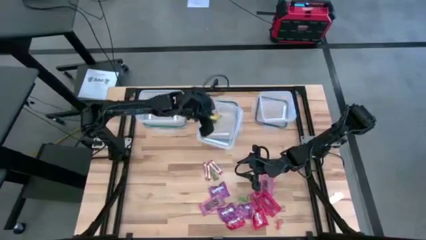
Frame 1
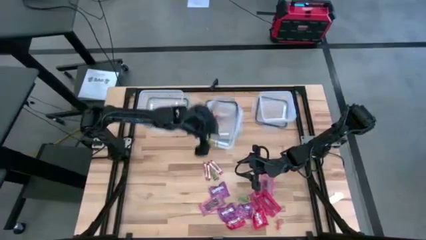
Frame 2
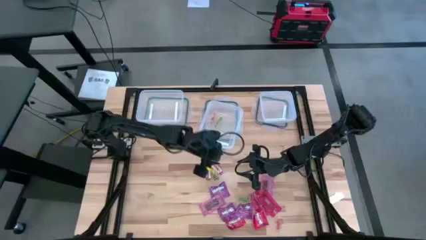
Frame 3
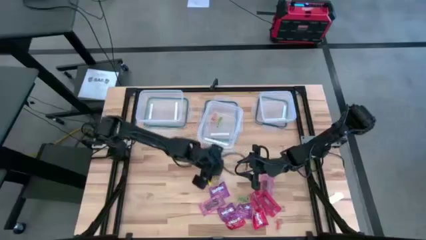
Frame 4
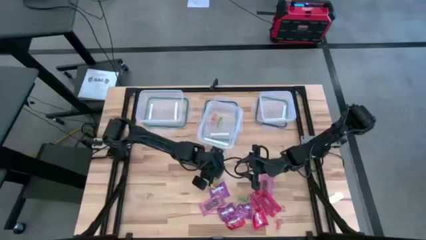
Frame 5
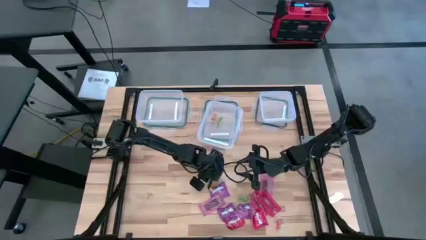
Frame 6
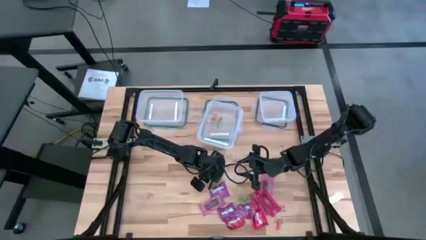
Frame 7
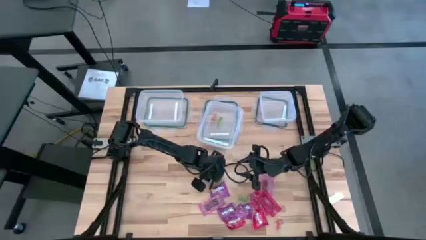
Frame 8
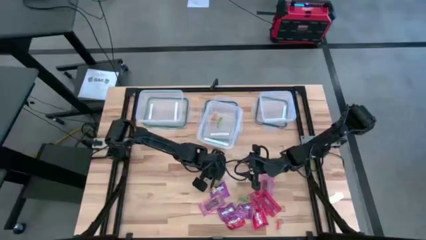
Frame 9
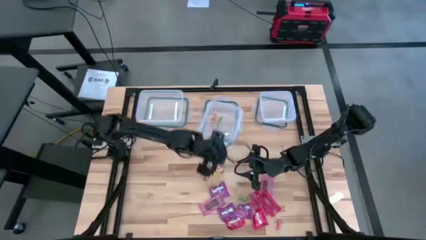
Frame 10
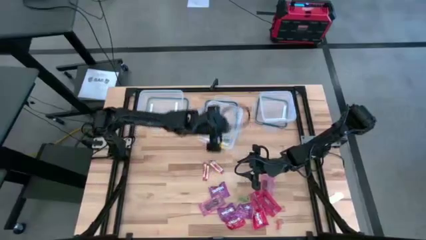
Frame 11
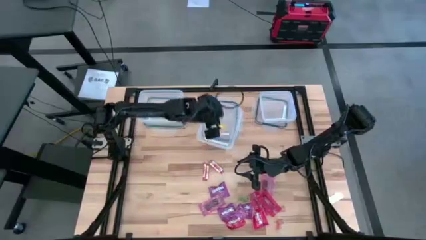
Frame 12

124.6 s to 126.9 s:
Task: Sort candy
Put the top green candy into the center transparent bin

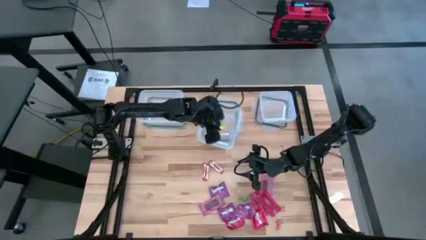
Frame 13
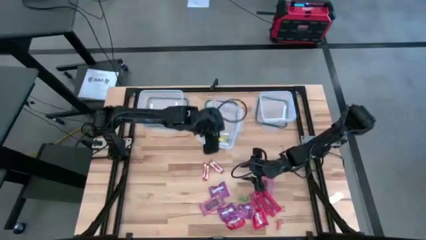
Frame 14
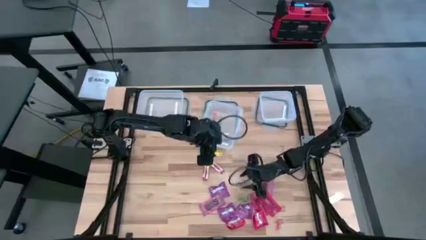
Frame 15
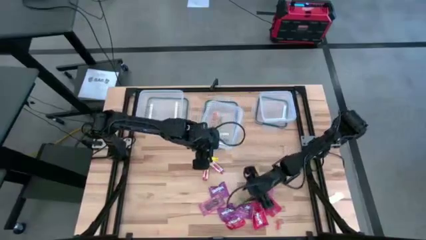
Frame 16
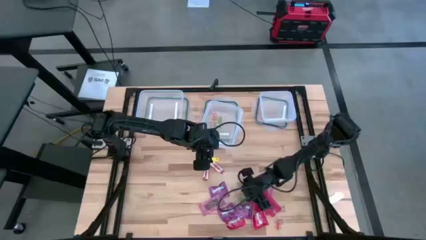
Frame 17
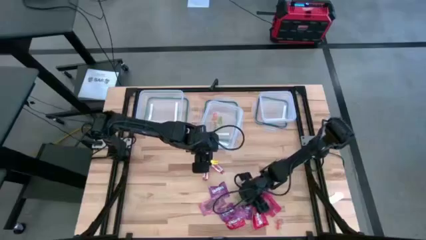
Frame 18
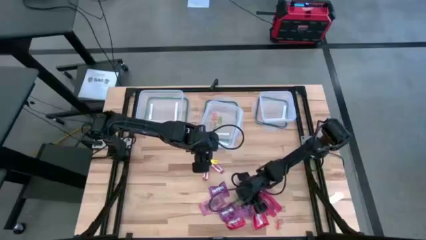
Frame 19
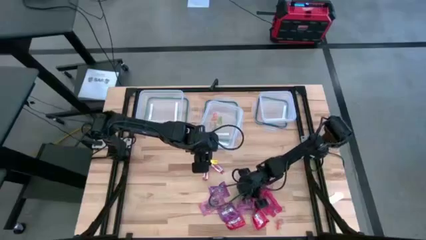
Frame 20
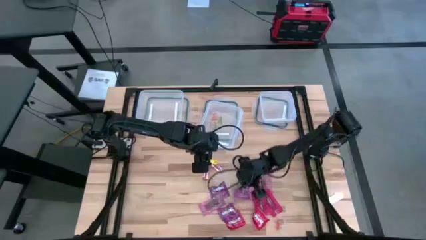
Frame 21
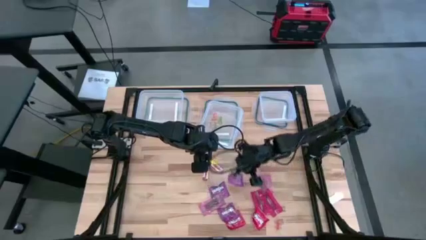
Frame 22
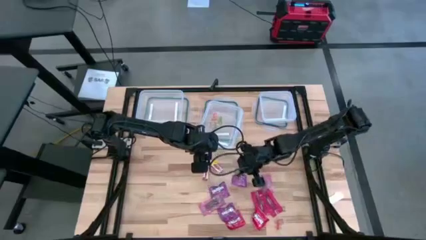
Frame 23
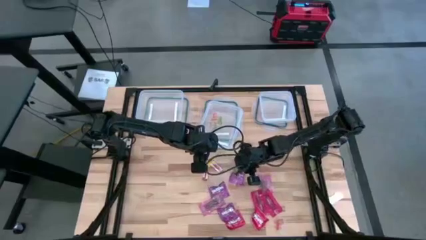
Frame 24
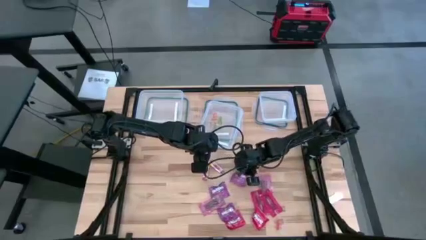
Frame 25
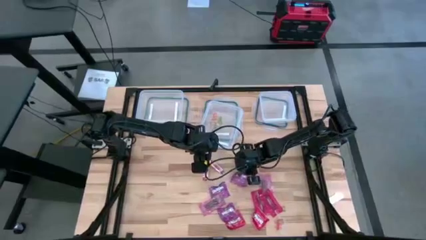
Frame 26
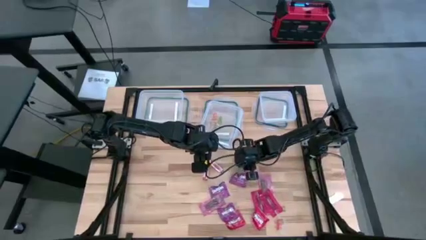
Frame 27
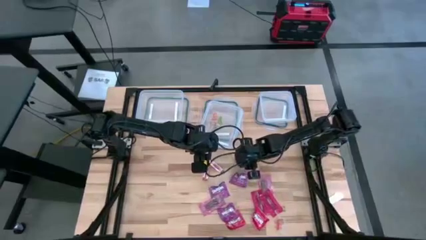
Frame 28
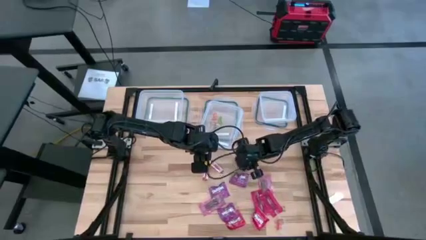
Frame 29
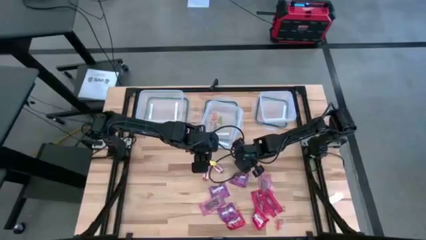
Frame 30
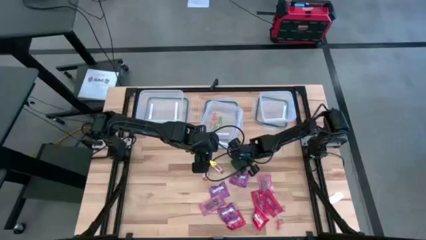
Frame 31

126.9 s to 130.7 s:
Put the green candy into the center transparent bin

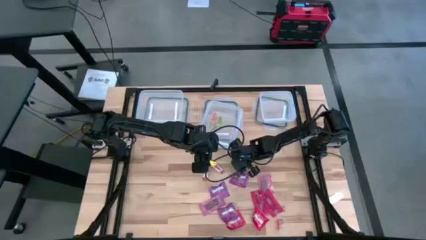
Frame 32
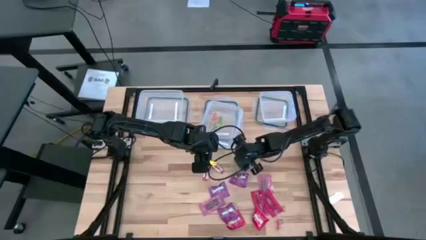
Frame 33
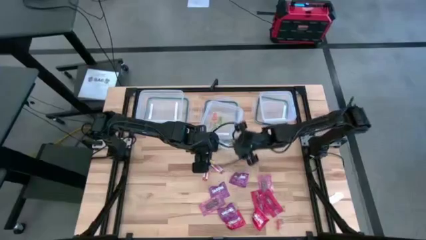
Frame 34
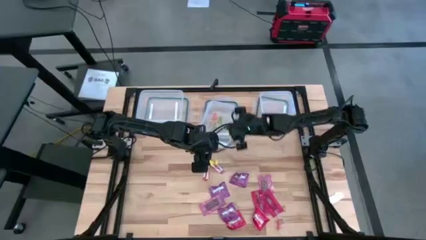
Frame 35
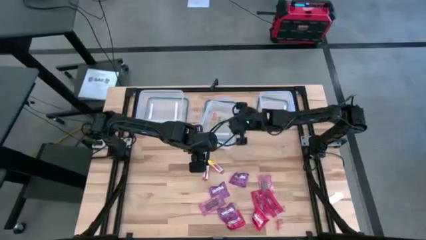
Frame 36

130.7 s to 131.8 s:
Put the green candy into the center transparent bin

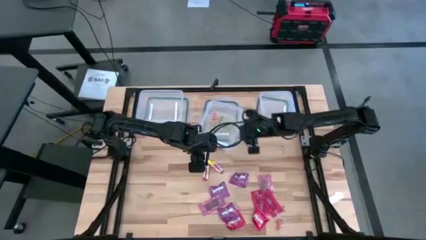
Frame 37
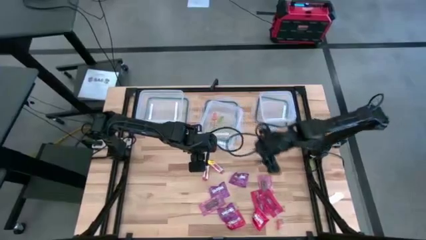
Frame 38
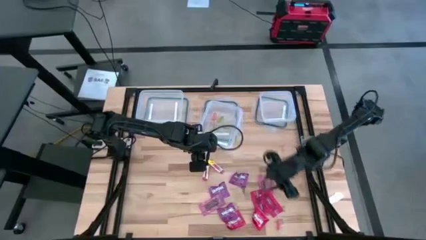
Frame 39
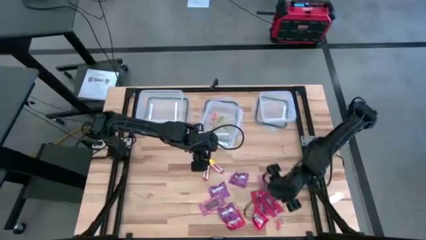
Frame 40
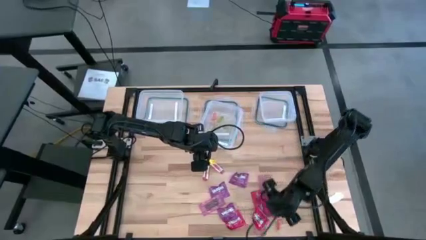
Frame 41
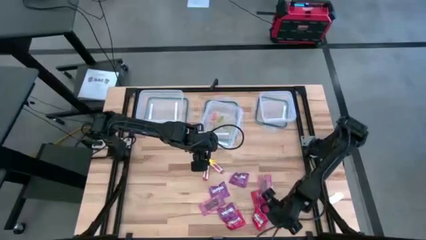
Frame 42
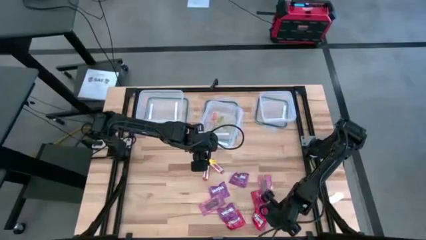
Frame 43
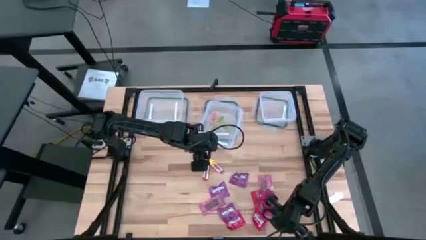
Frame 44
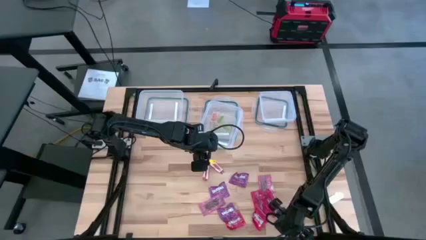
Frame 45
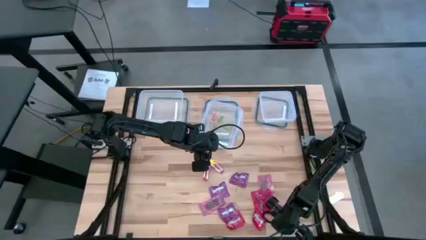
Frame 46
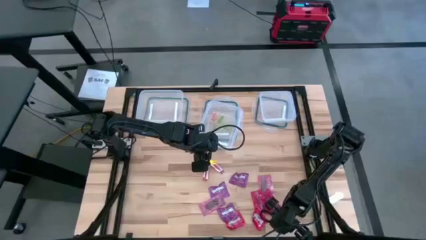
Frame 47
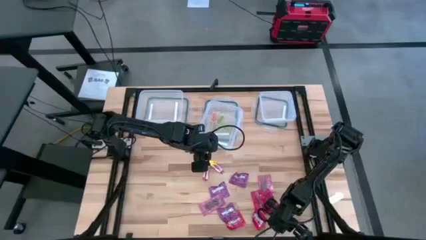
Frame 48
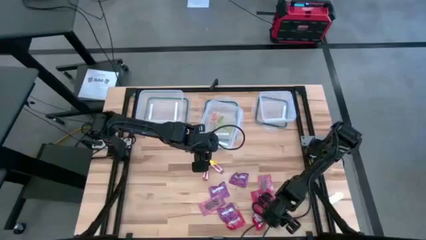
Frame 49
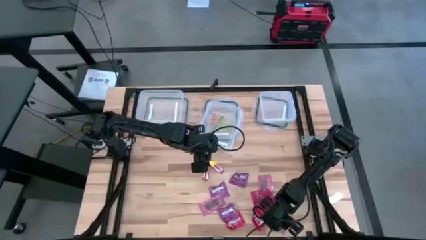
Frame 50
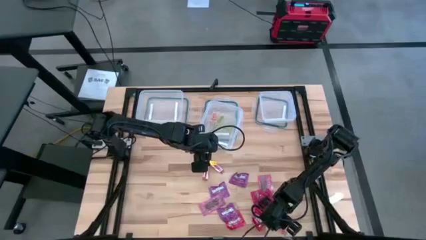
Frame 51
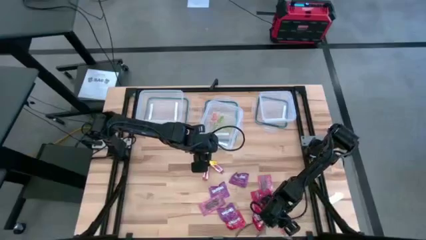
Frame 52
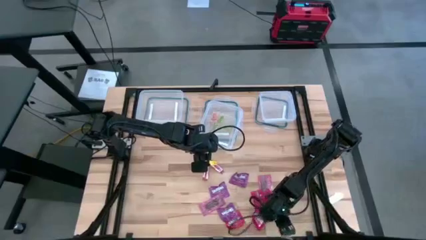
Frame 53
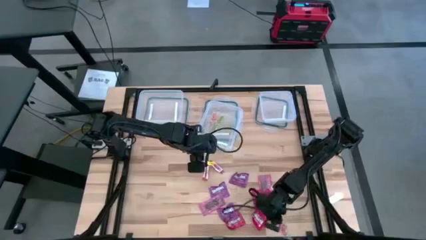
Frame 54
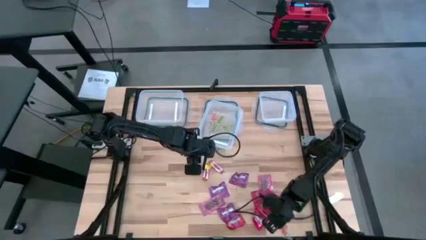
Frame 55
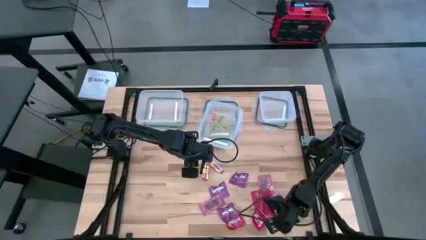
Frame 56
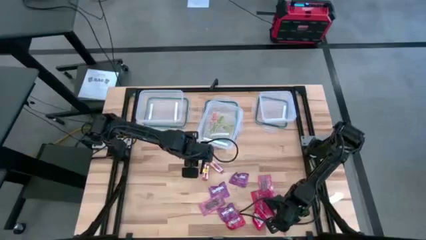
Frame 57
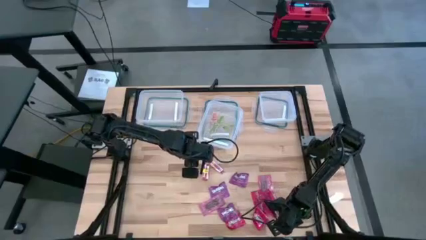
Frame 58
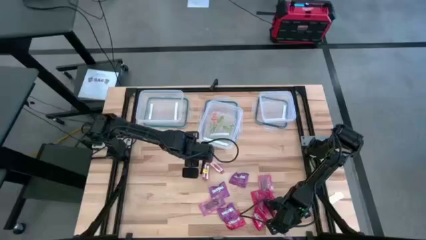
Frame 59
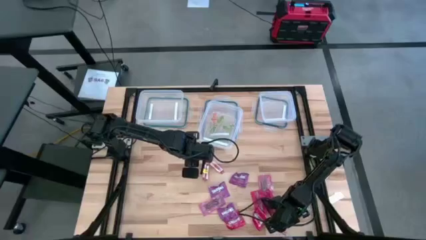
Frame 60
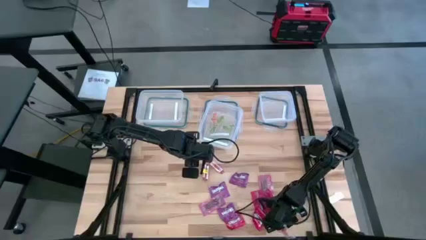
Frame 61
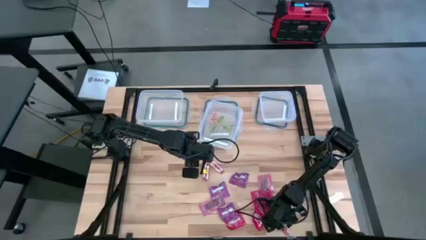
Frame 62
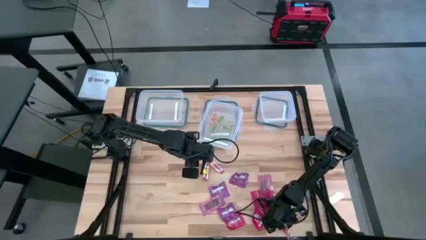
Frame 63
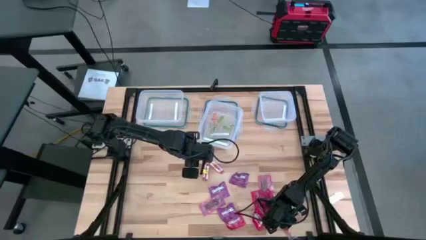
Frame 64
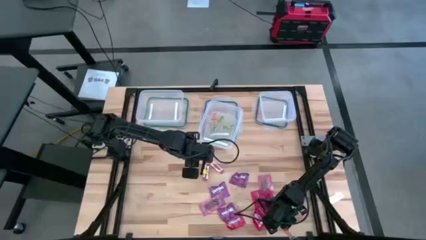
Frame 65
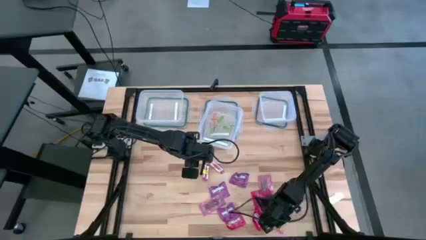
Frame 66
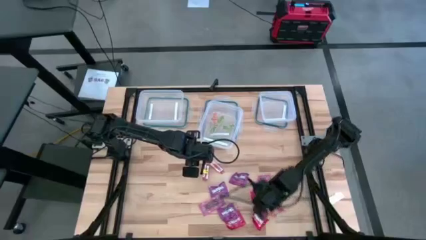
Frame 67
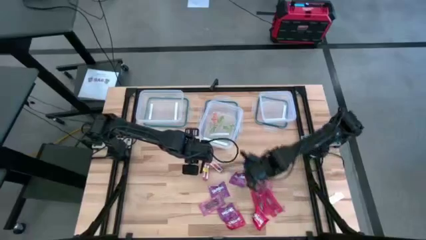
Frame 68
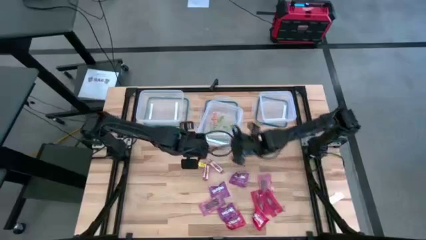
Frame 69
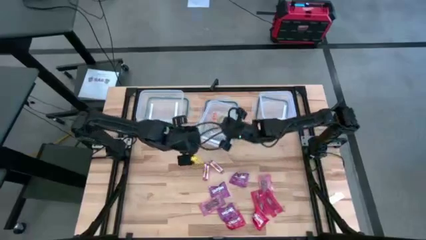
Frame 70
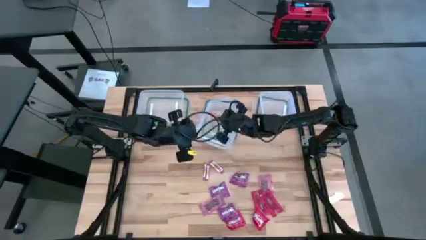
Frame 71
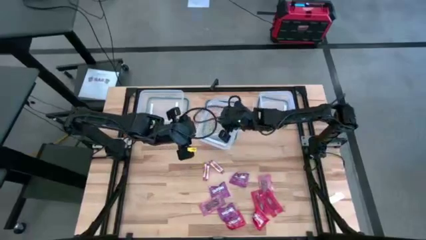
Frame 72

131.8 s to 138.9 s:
Put the orange candy into the center transparent bin

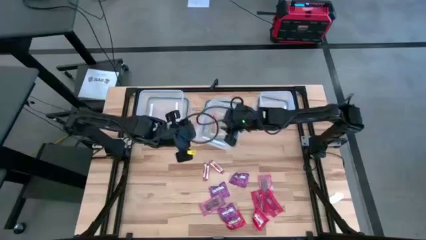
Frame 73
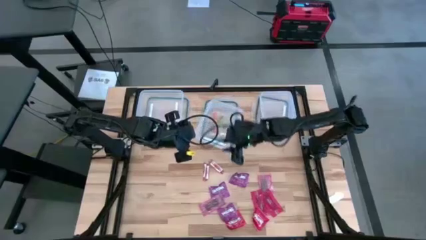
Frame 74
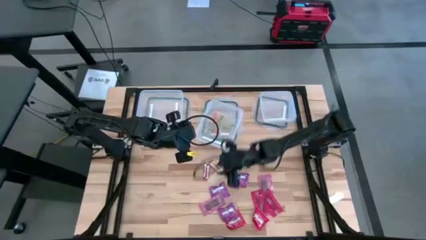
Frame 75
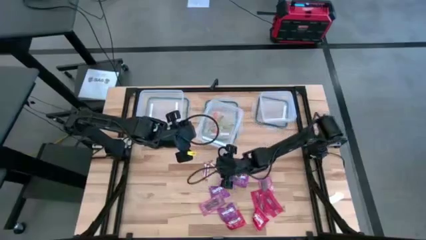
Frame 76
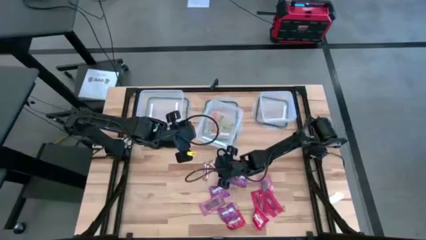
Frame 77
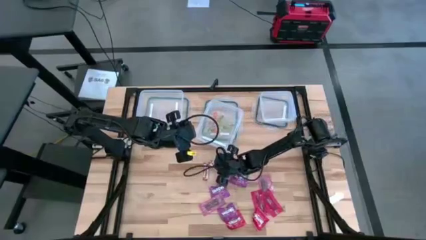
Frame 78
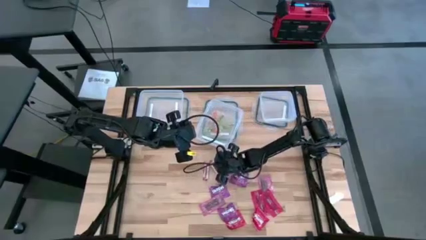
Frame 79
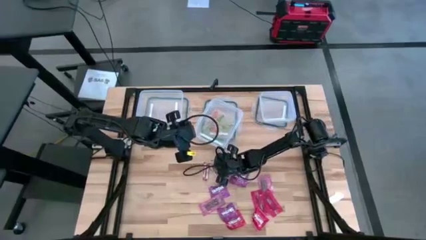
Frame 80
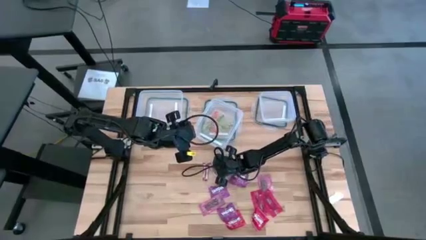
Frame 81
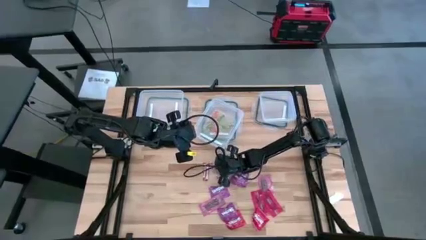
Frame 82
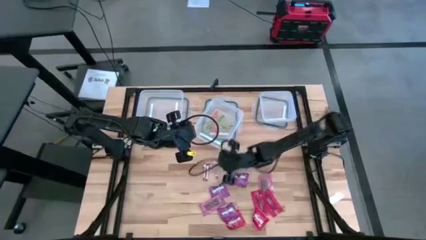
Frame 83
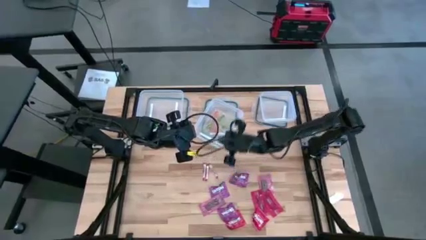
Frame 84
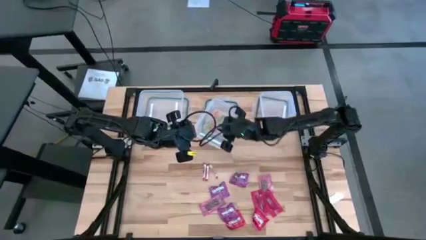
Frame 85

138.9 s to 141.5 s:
Put the white candy into the center transparent bin
